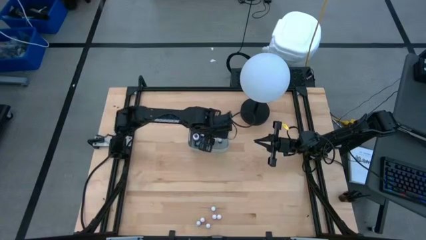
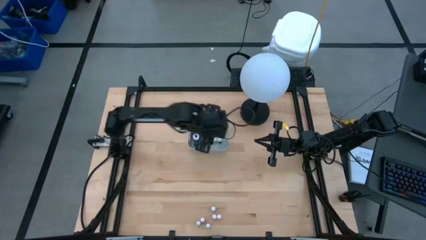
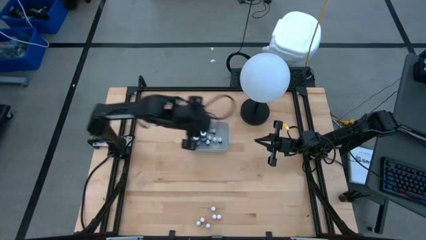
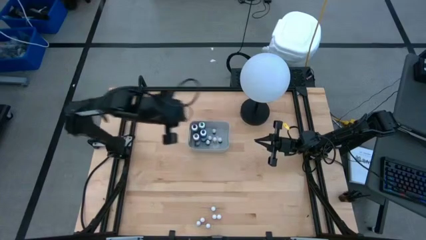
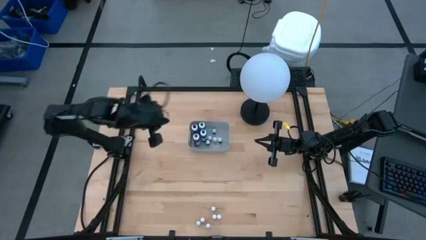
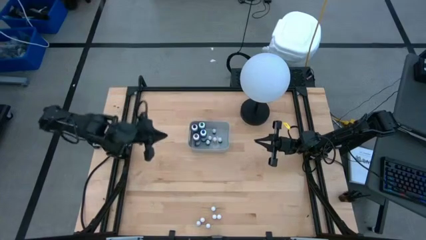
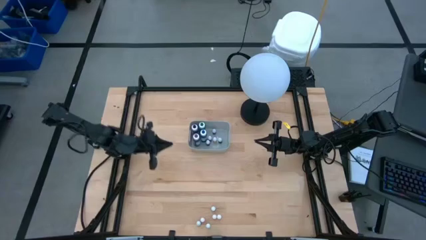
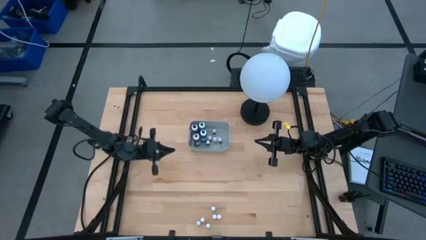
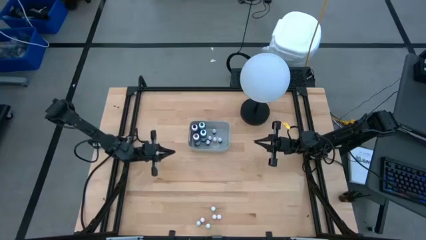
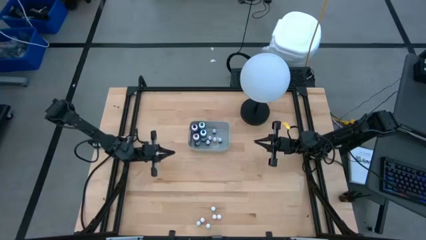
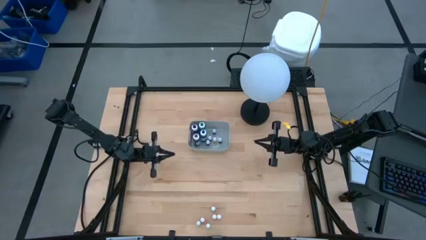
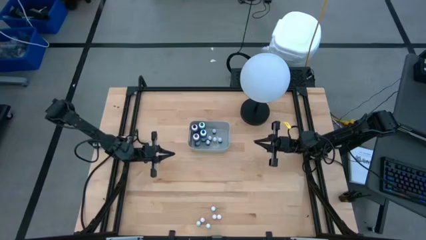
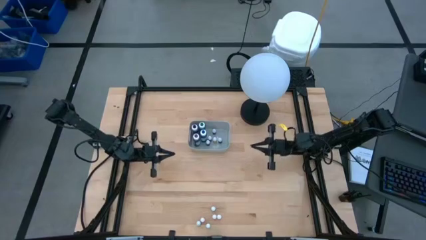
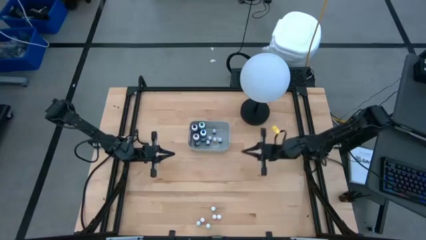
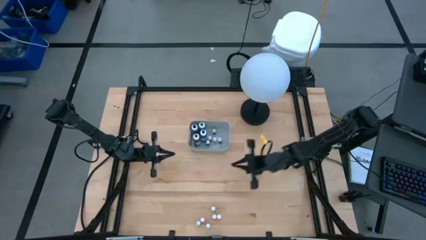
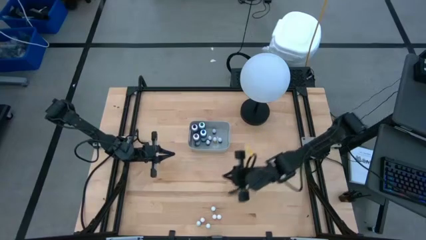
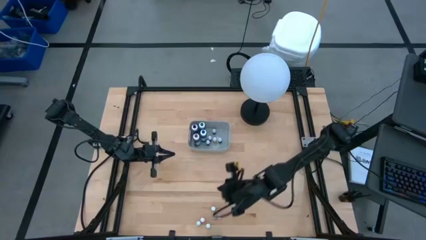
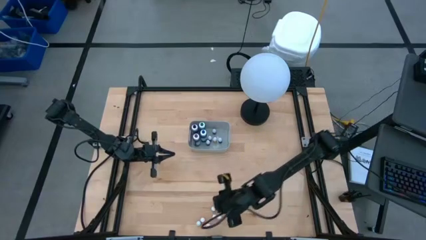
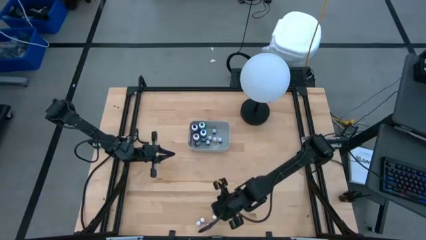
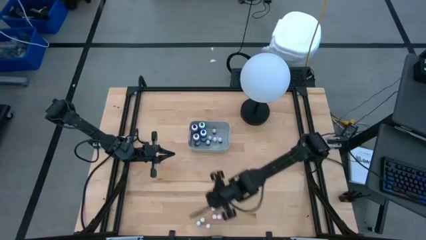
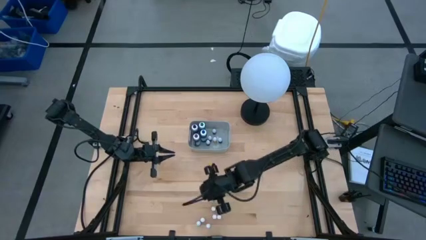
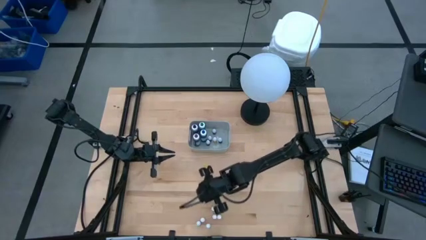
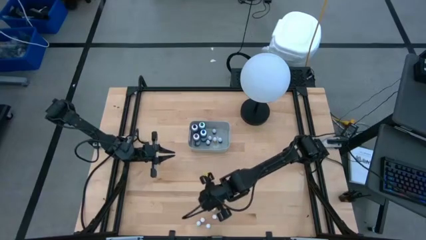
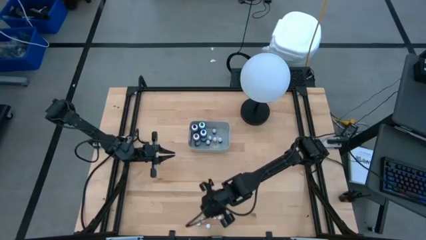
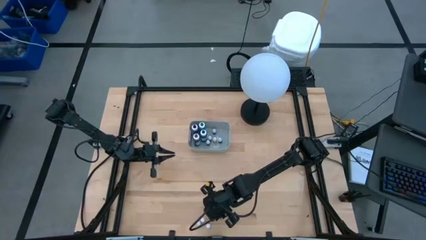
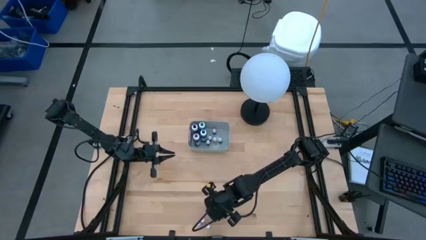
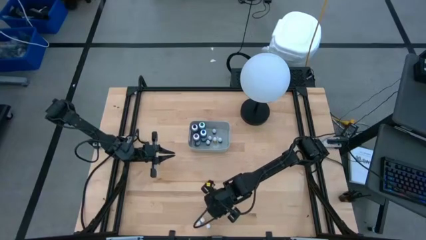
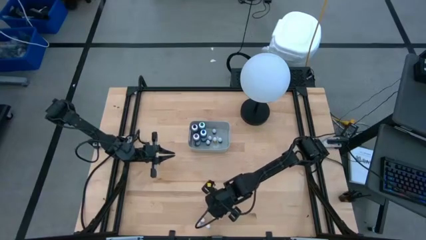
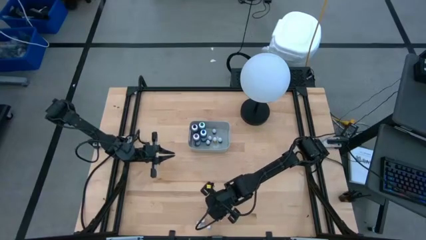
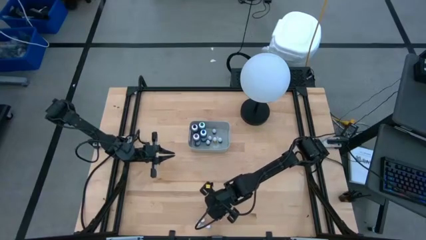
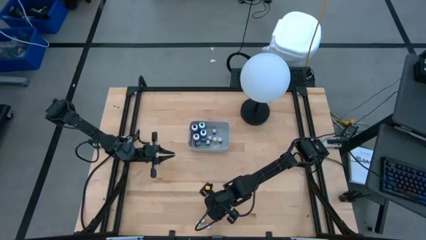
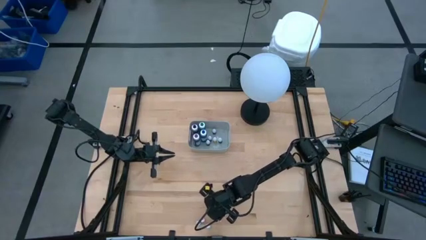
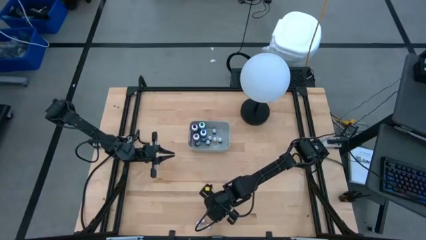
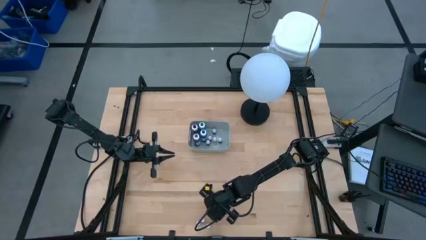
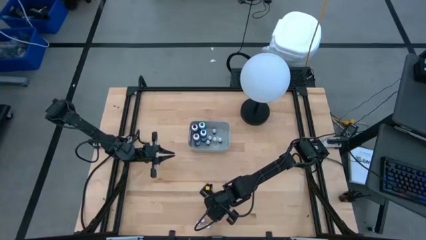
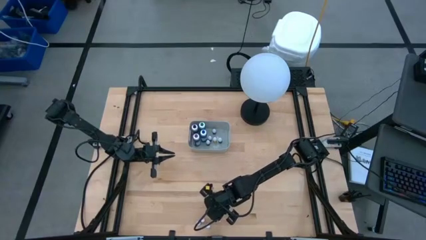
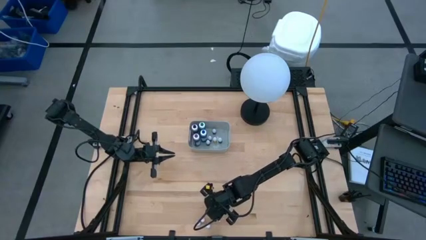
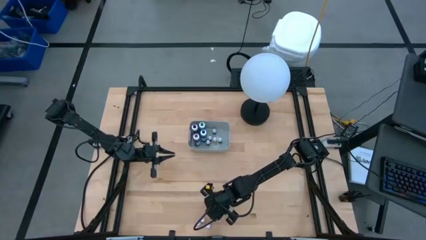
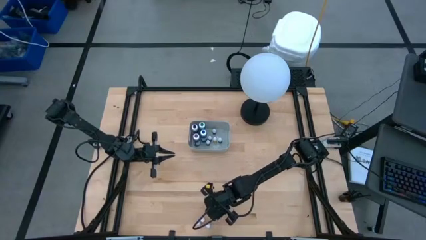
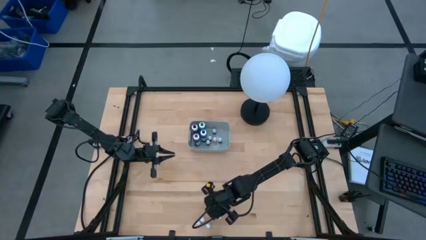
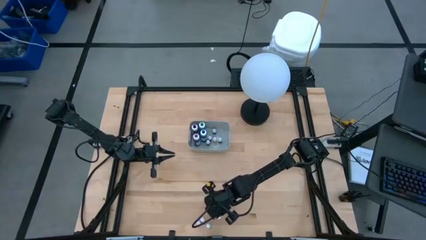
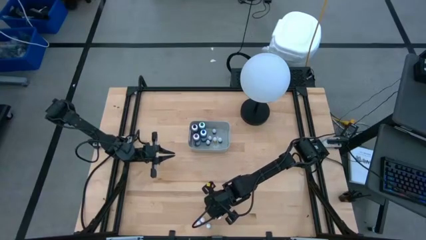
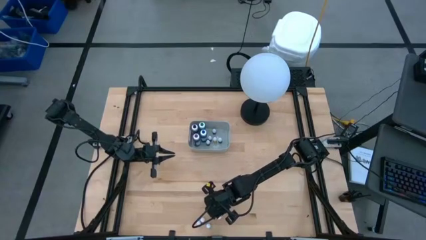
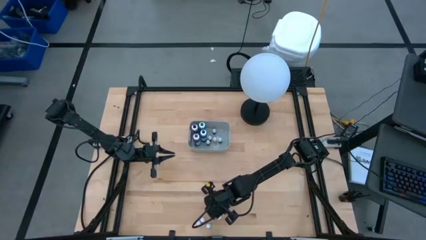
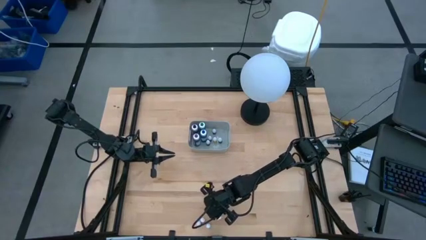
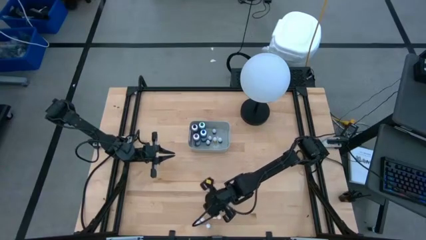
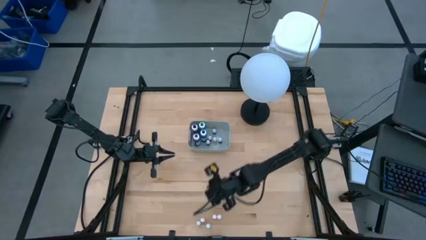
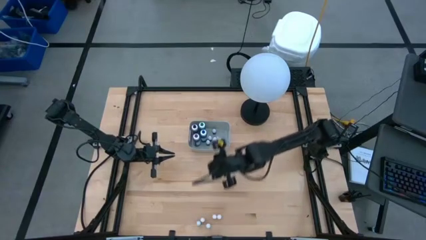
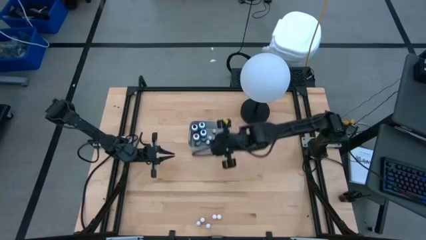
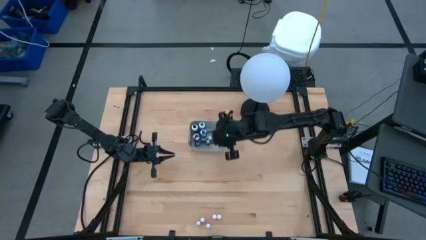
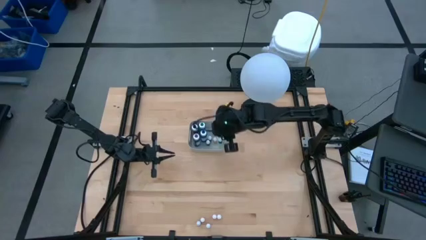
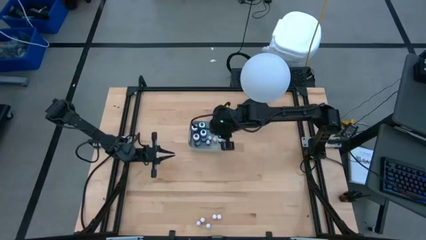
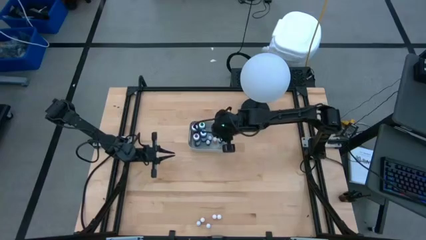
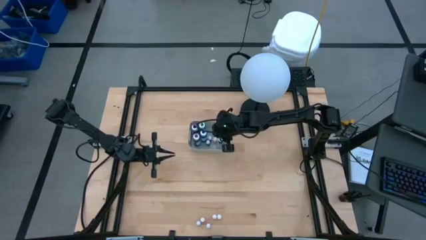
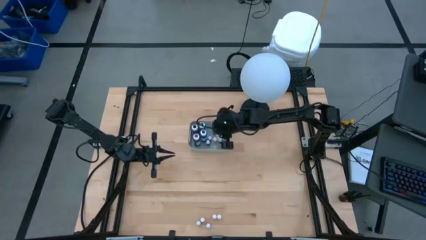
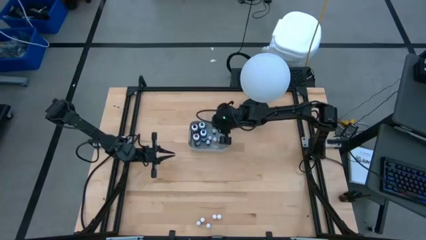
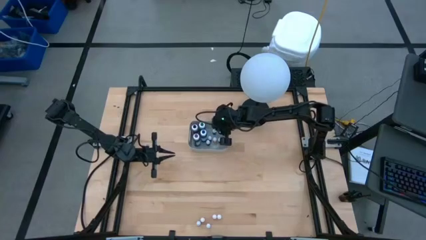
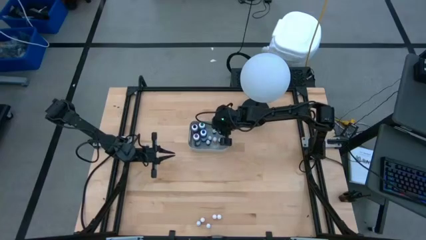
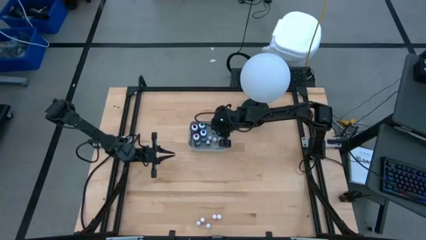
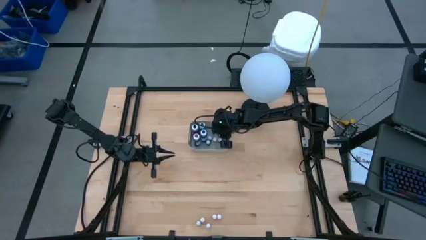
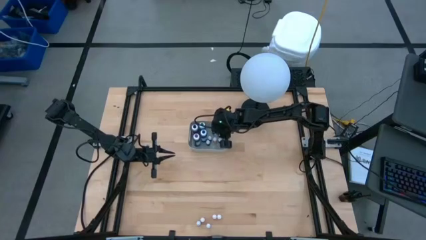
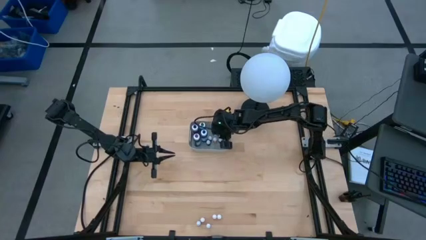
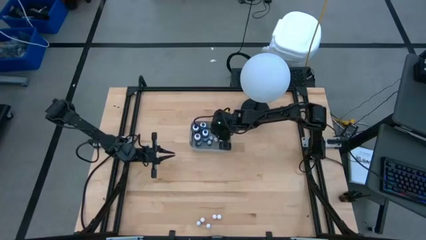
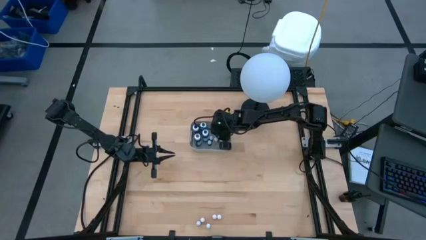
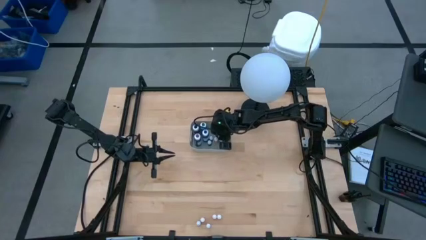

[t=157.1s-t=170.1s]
Task: Pick & Place food coloring
Put the small purple food coloring bottle into the gray bin

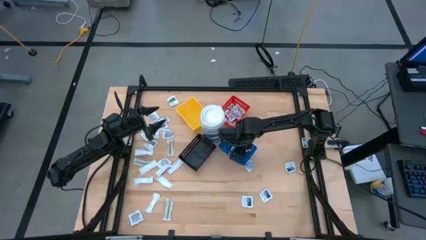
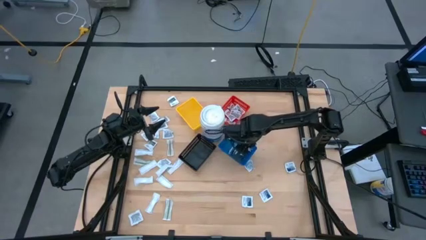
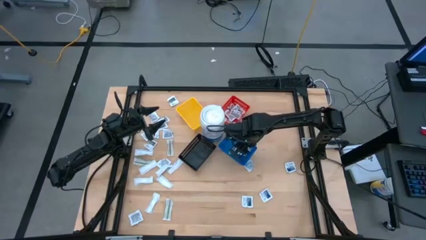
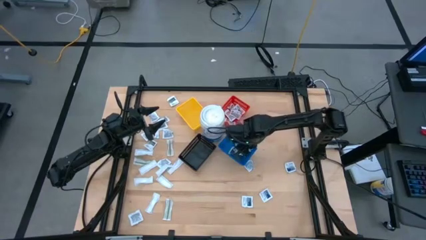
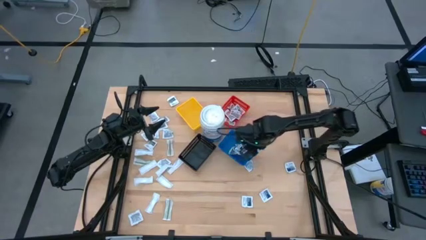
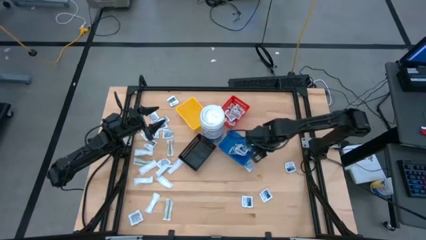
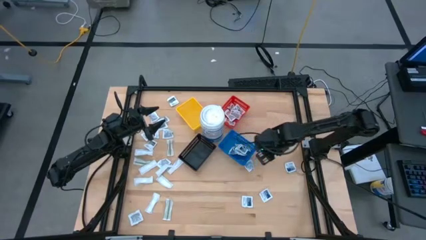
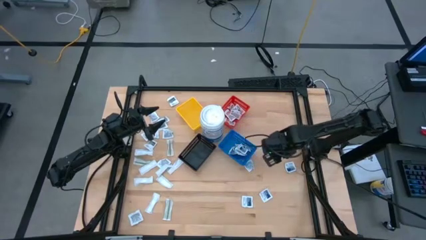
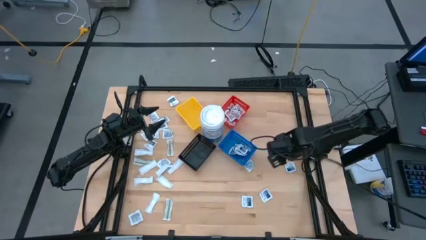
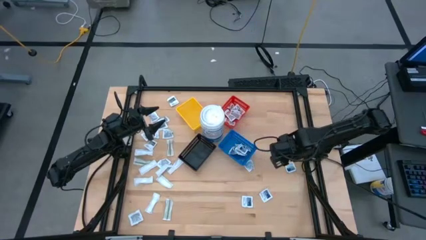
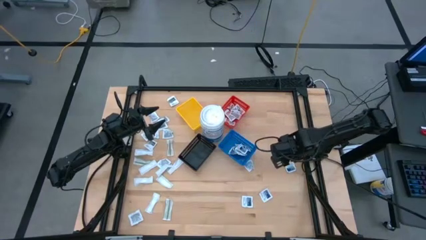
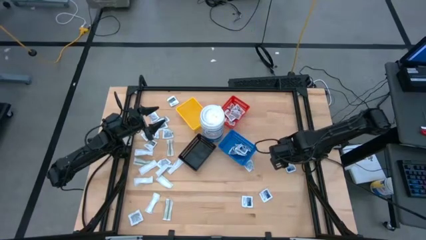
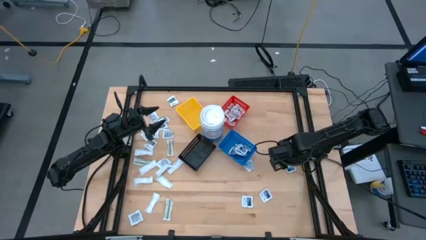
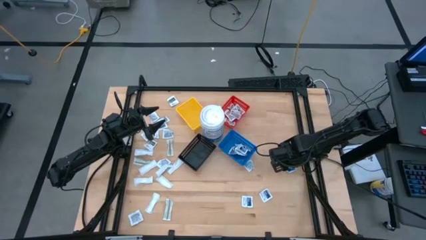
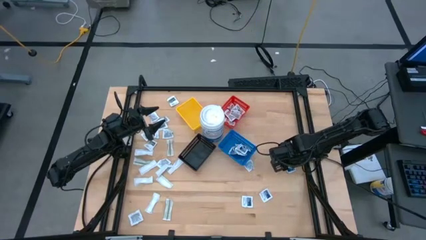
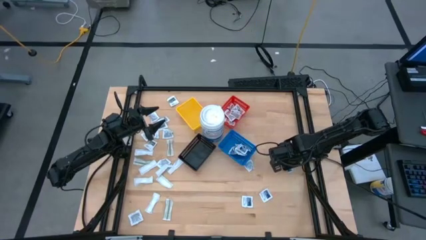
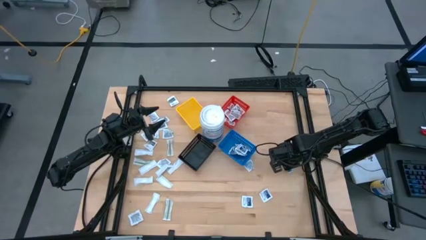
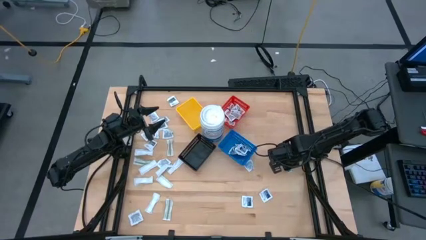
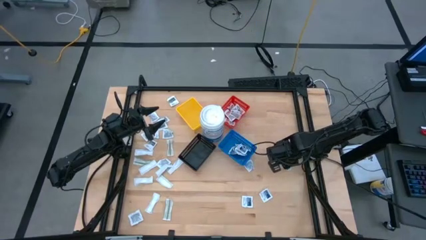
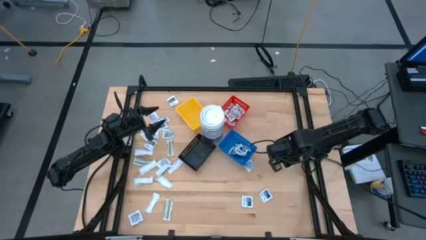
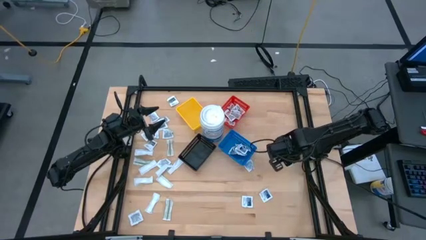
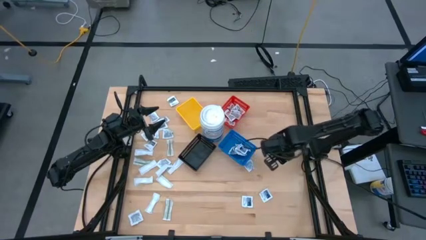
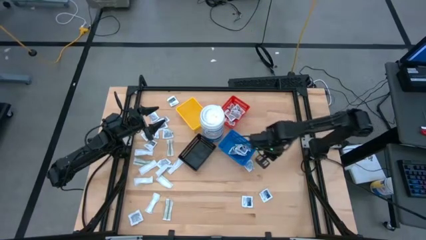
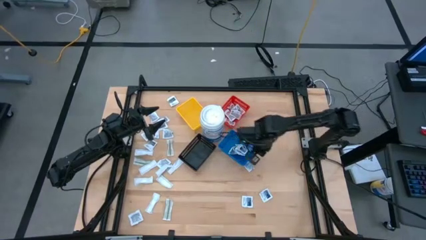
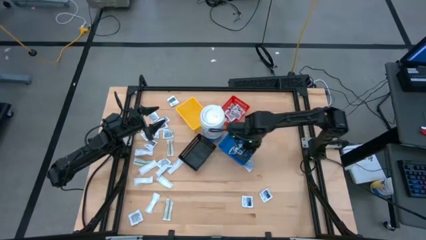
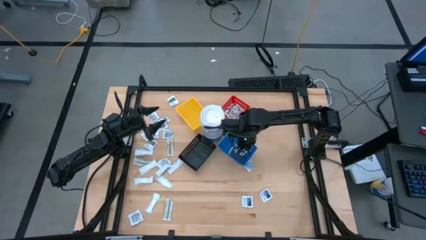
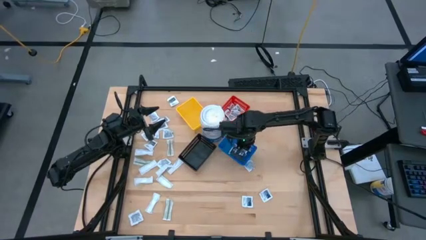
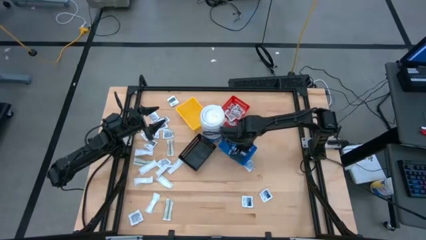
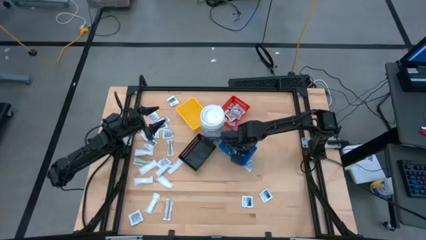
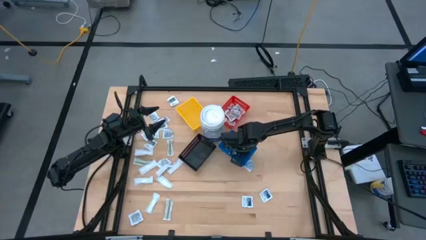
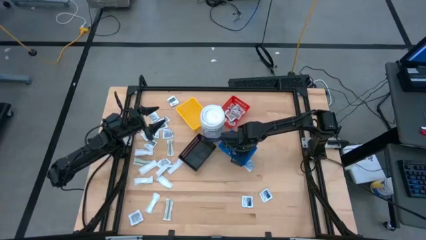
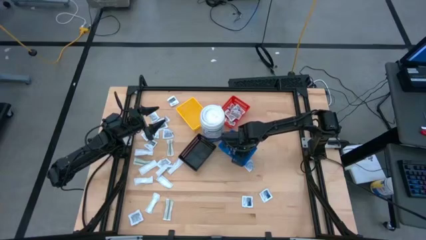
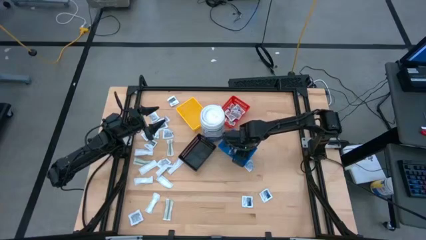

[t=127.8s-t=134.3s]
Task: Pick & Place First Aid Supplies
Put the alcohol pad into the blue bin
